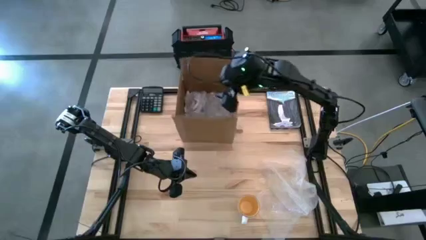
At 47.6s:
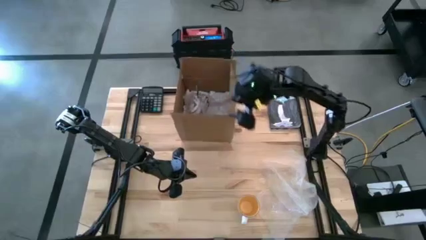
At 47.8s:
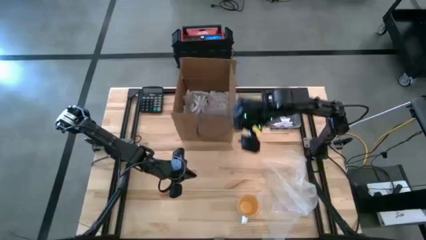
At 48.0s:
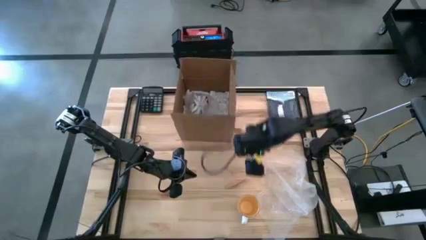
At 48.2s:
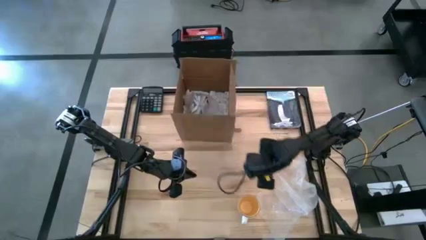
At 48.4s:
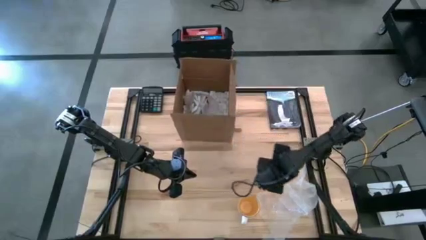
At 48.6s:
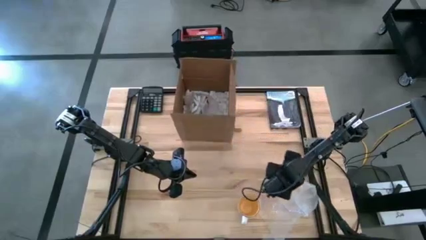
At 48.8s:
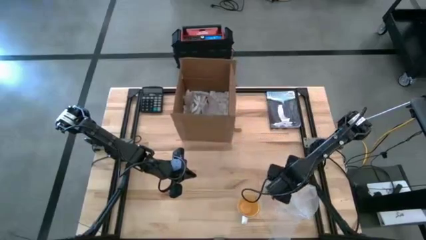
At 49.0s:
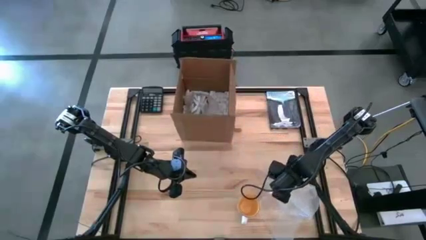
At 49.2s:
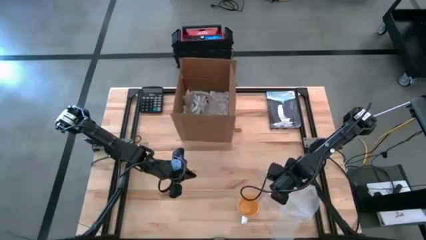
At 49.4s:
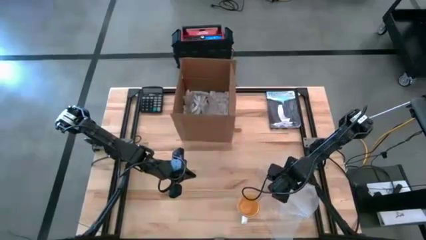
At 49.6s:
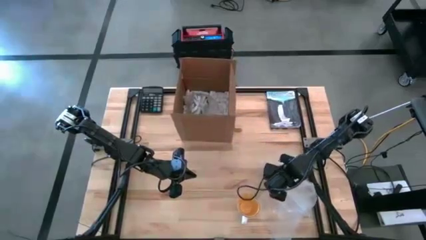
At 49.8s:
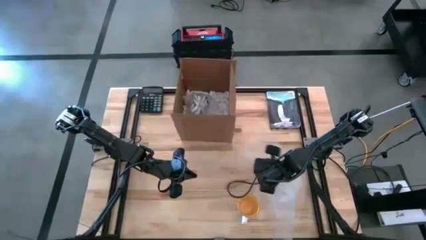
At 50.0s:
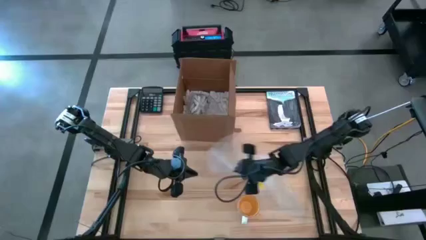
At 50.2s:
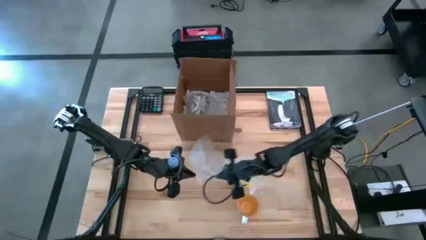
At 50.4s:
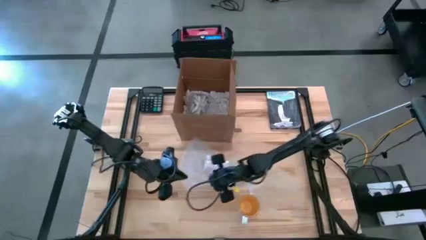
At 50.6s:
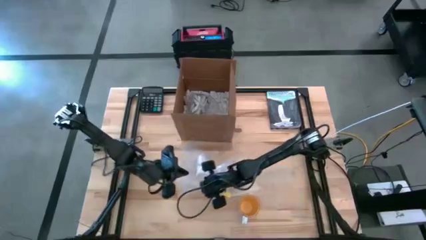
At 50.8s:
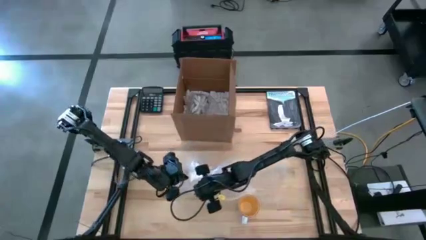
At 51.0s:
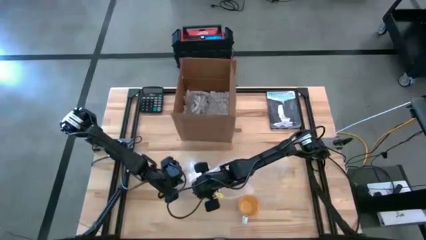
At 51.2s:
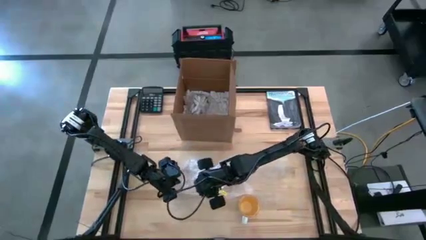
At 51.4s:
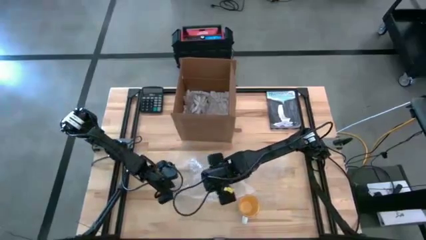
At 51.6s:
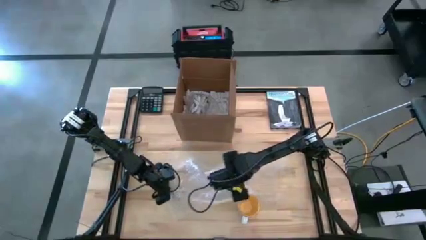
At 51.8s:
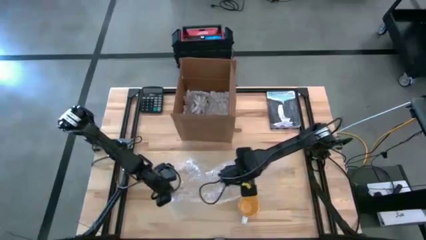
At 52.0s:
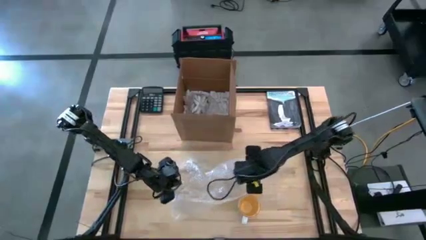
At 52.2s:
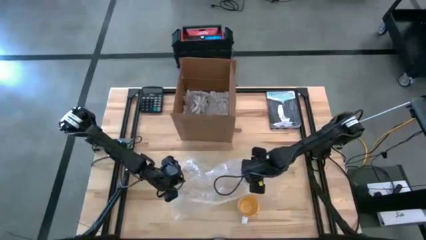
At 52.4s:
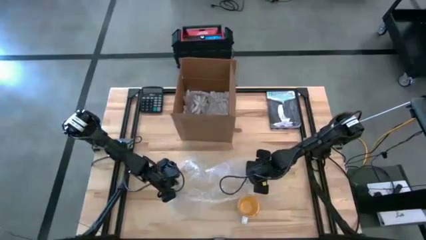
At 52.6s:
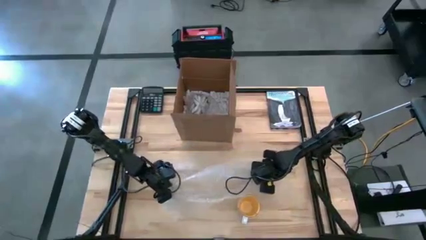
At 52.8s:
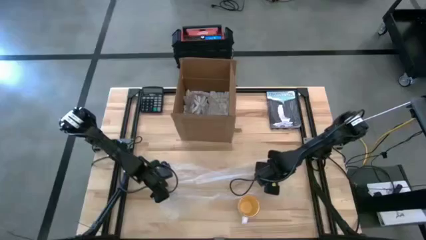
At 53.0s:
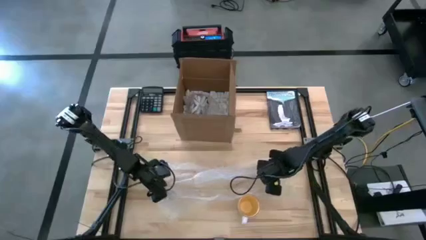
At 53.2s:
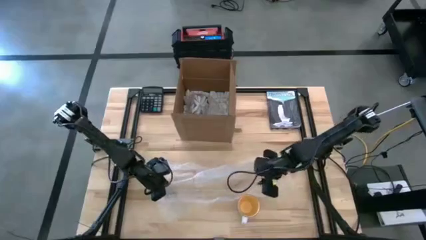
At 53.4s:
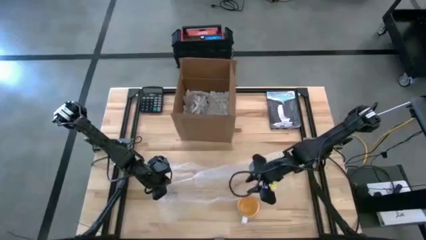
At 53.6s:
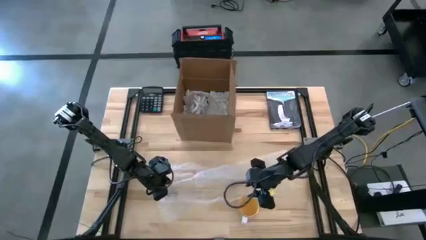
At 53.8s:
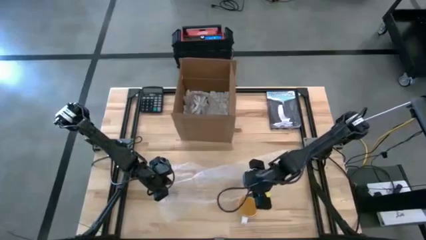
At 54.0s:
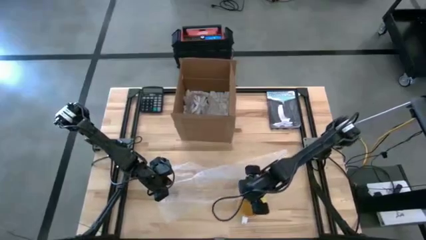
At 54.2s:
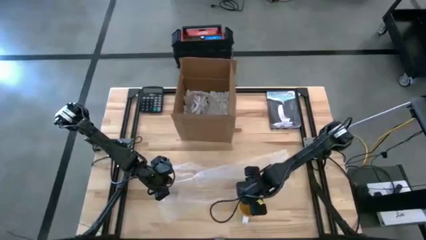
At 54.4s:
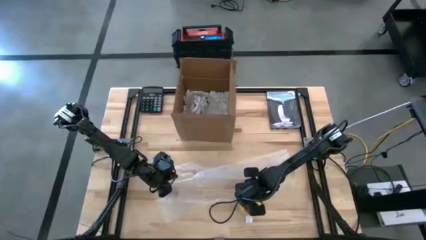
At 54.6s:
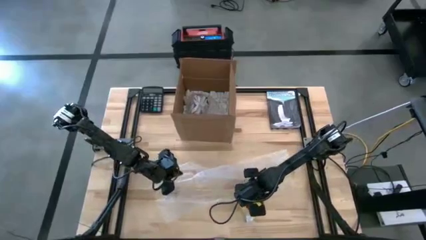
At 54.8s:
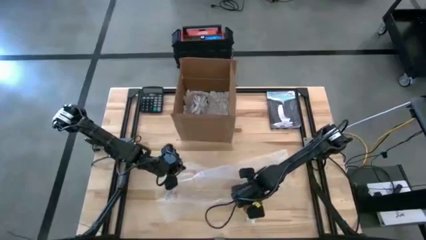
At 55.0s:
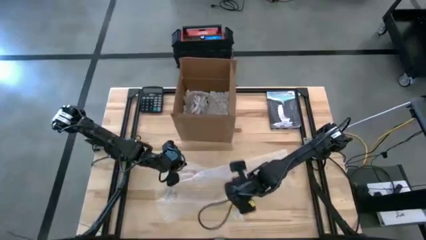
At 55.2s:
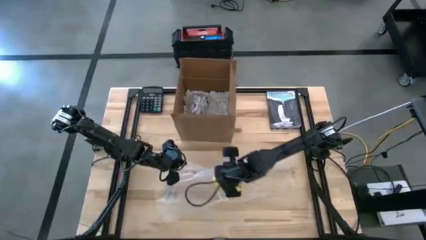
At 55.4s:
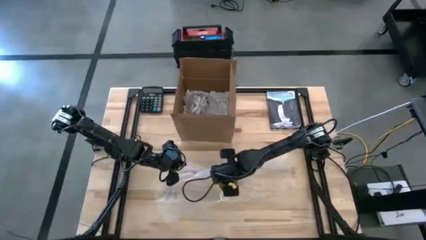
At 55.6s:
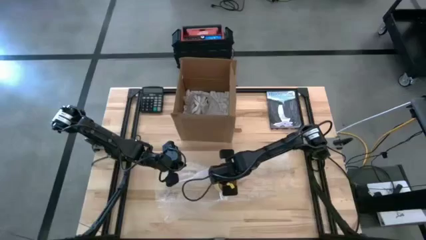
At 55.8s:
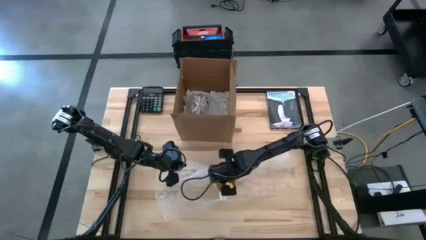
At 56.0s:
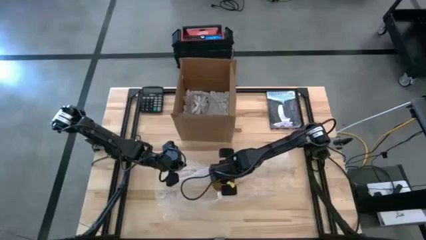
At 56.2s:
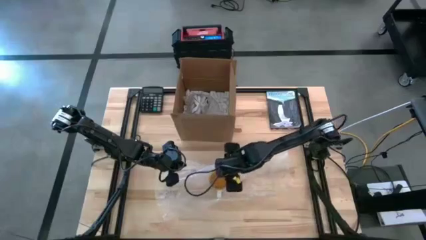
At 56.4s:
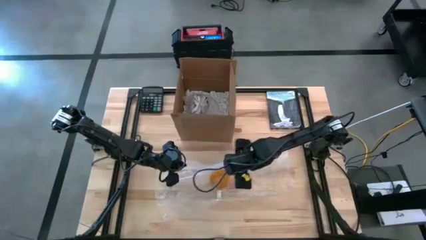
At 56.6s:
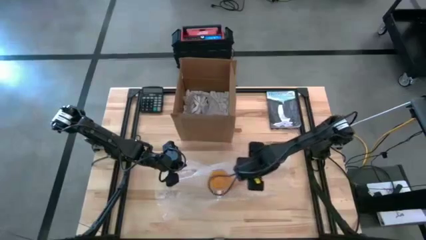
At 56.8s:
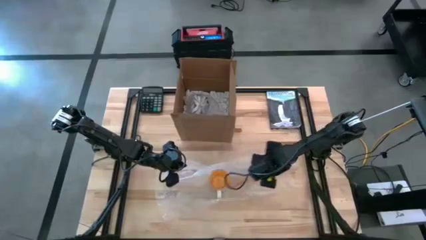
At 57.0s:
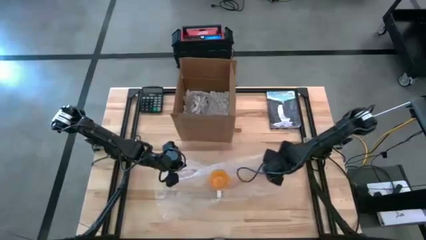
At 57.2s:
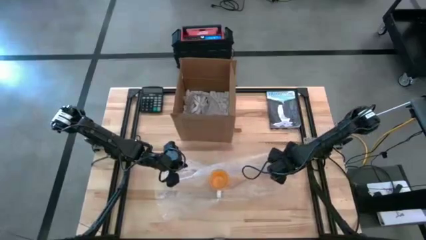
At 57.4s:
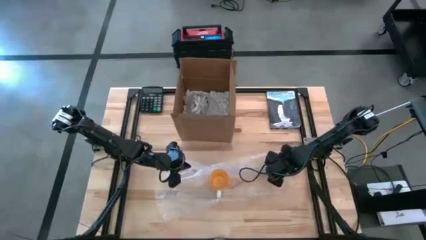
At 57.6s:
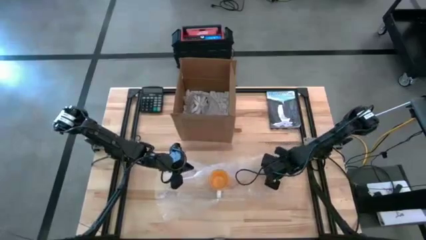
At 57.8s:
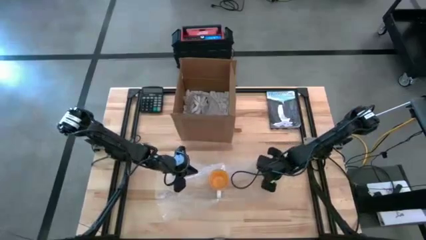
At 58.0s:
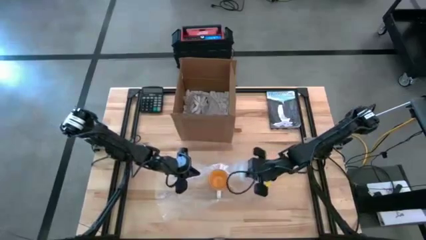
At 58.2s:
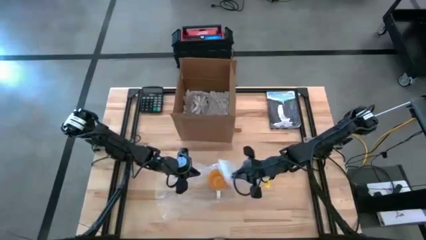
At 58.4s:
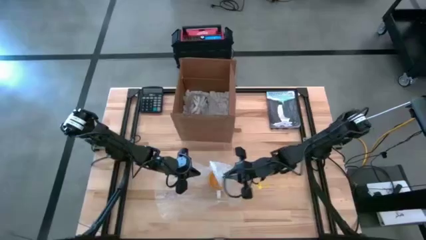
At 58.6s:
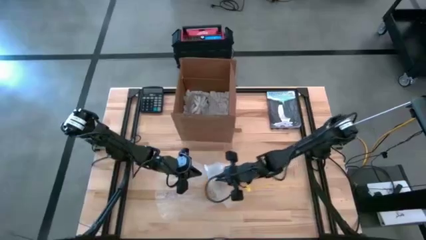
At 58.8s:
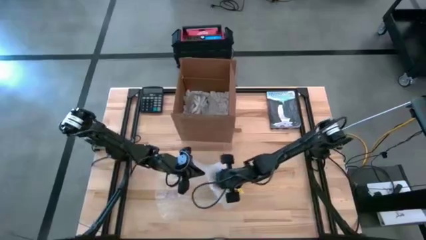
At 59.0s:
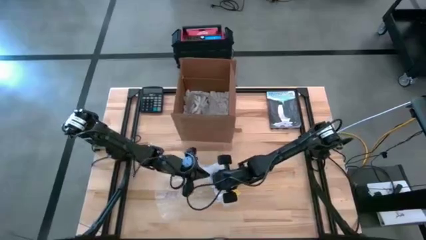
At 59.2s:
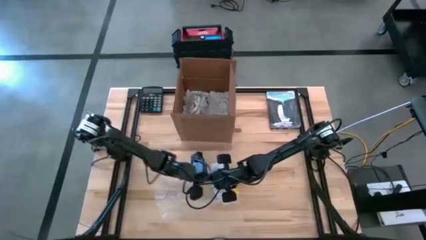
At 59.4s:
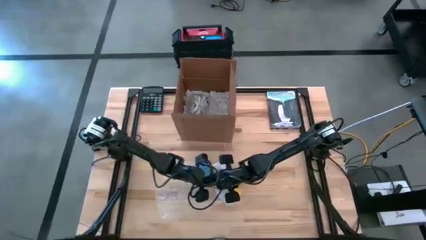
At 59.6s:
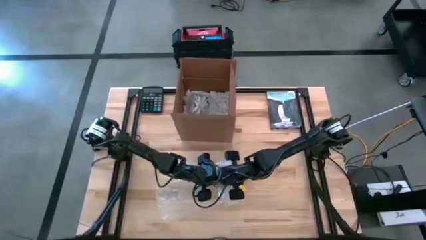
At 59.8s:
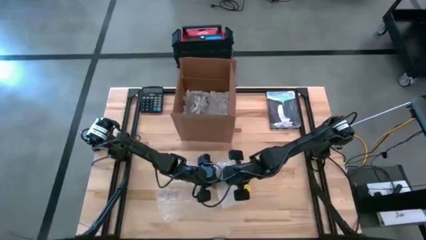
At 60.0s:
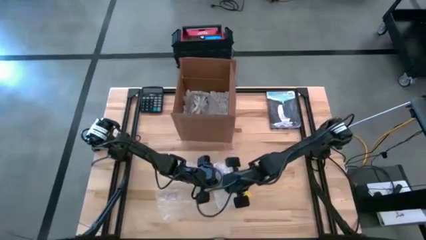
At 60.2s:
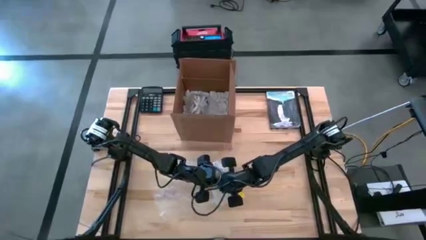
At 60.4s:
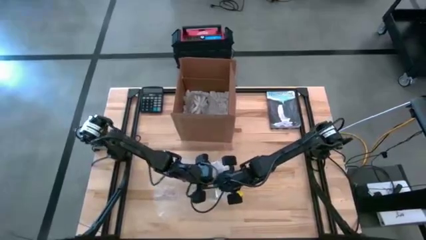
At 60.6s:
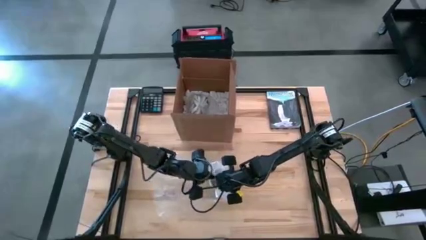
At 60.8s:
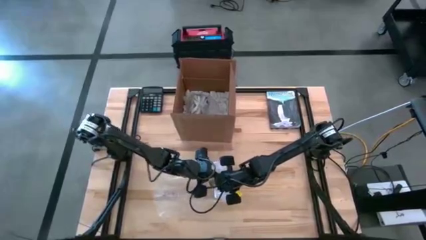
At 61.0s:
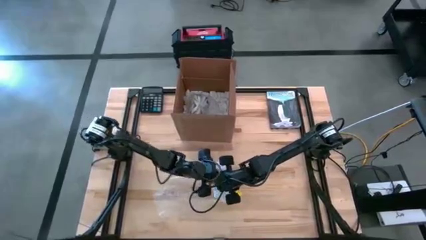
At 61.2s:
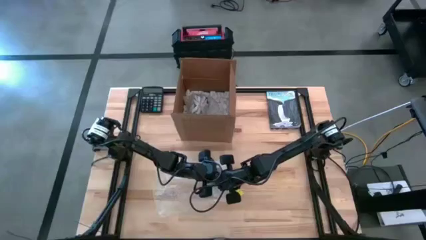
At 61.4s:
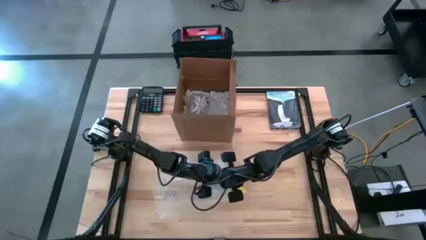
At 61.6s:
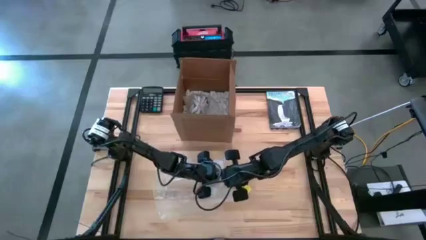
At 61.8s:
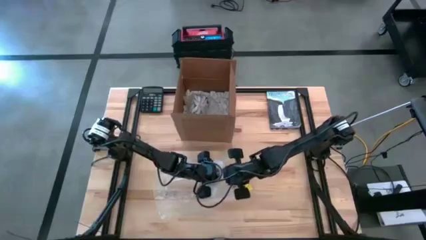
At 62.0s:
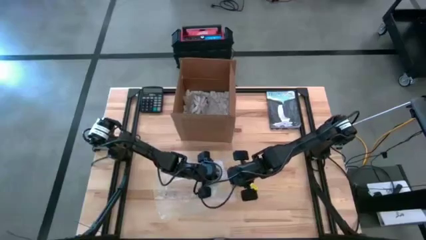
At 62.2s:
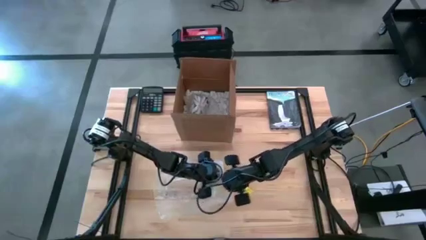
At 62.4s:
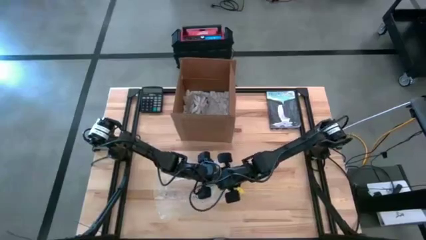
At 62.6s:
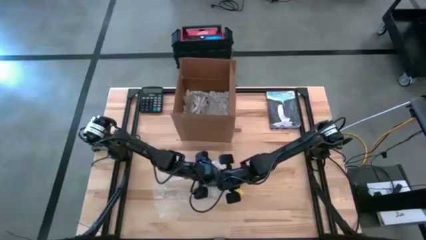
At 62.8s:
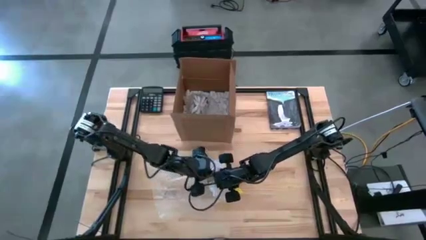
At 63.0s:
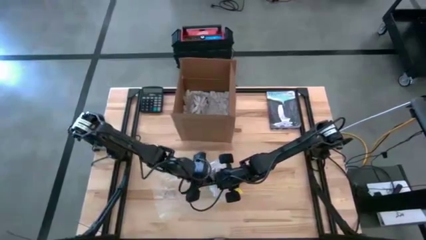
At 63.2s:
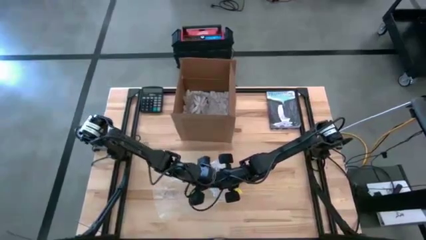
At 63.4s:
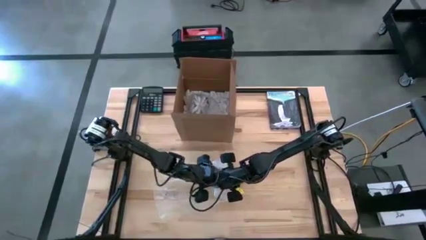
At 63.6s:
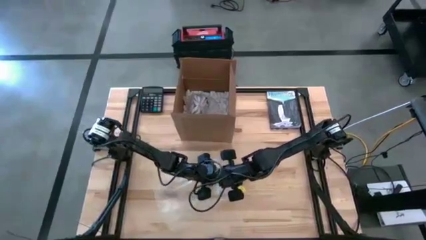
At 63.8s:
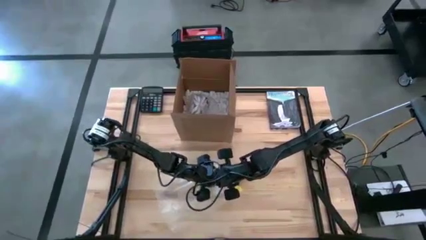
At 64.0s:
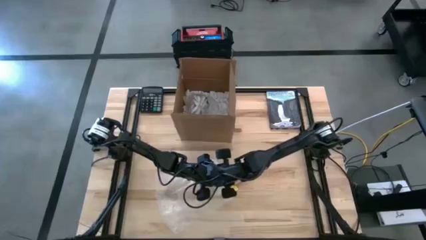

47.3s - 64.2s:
Task: wrap mug
Wrap the yellow mug with bubble wrap
